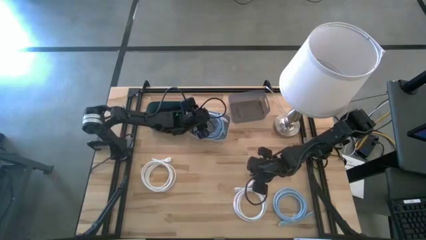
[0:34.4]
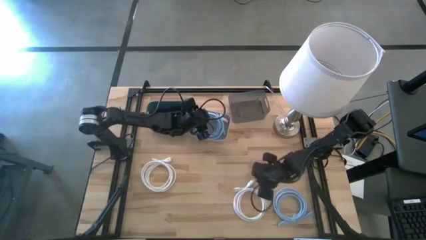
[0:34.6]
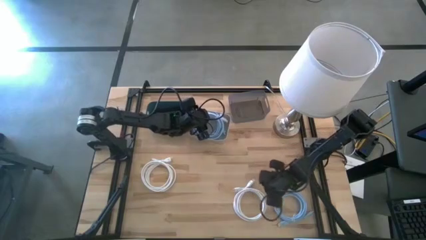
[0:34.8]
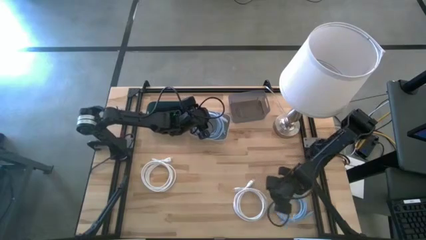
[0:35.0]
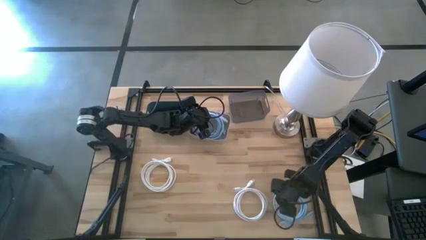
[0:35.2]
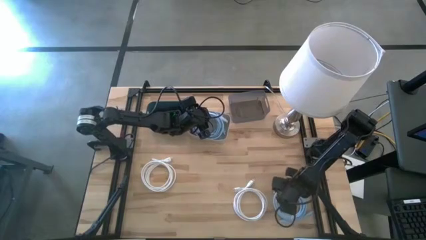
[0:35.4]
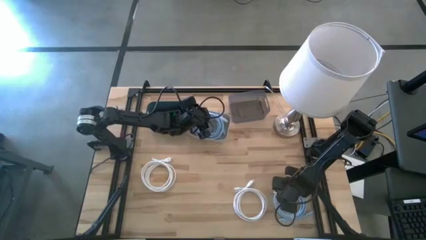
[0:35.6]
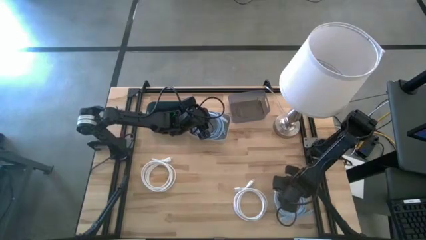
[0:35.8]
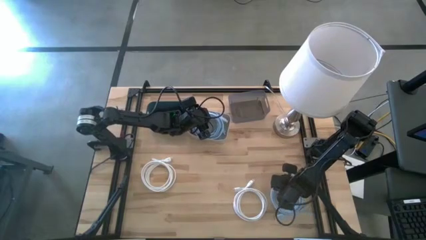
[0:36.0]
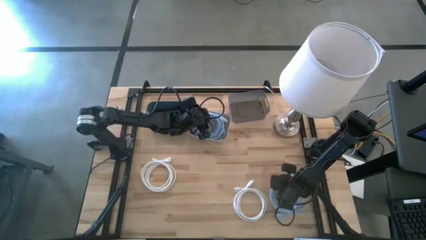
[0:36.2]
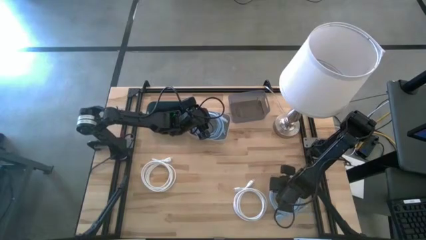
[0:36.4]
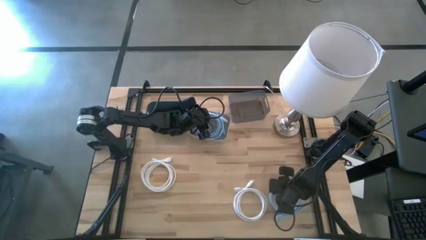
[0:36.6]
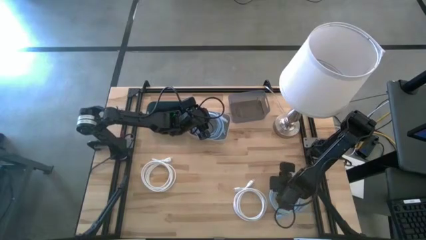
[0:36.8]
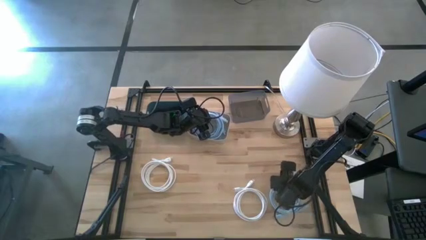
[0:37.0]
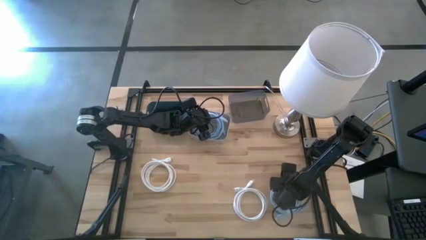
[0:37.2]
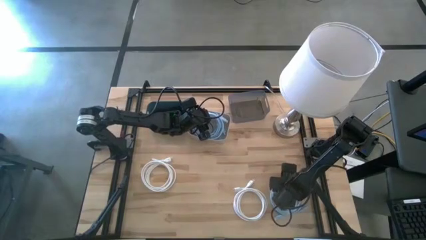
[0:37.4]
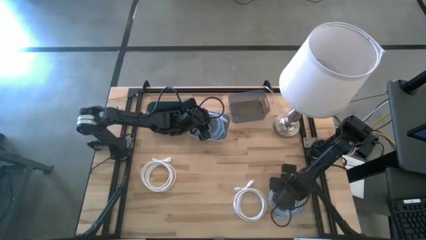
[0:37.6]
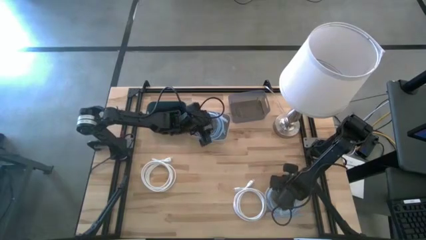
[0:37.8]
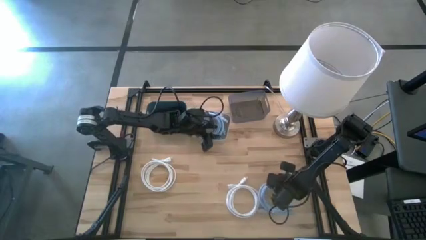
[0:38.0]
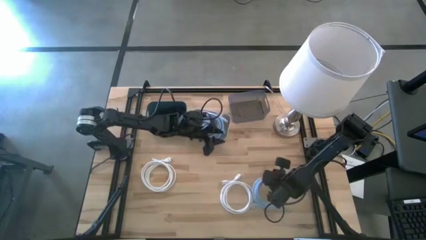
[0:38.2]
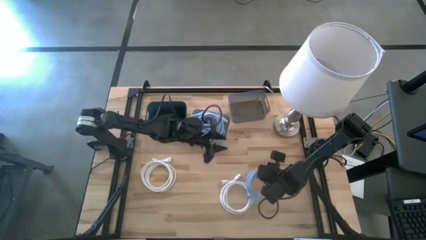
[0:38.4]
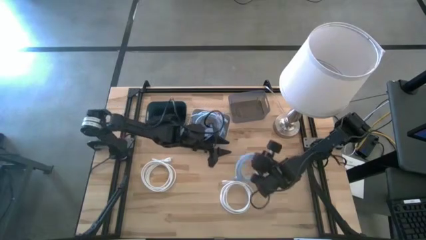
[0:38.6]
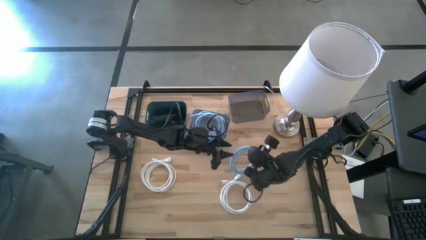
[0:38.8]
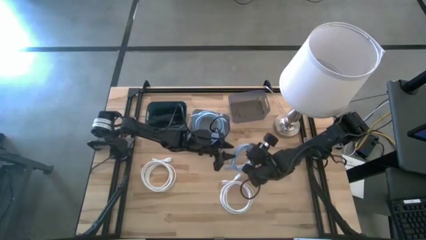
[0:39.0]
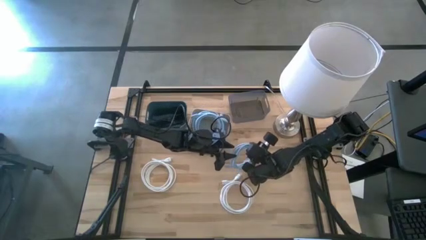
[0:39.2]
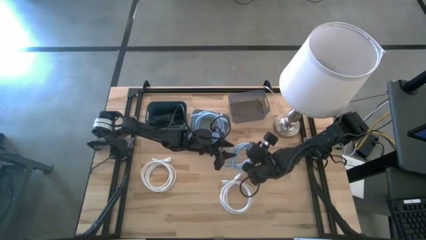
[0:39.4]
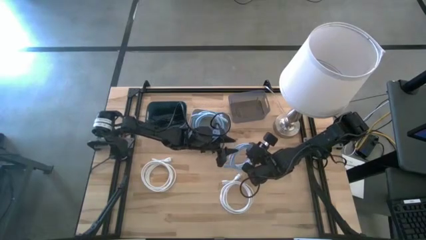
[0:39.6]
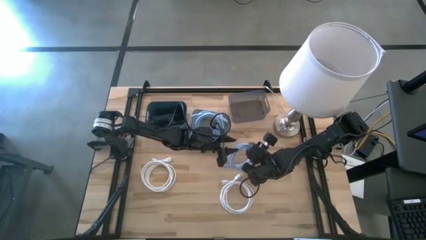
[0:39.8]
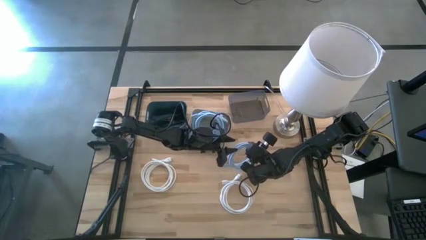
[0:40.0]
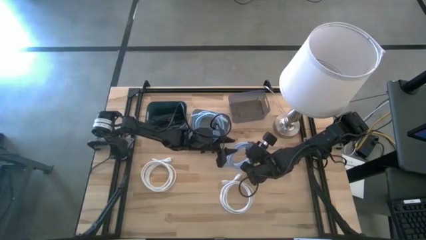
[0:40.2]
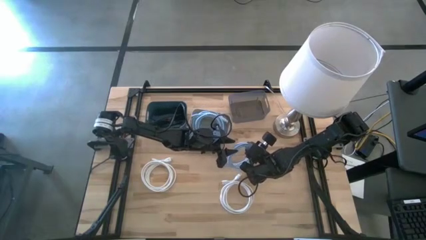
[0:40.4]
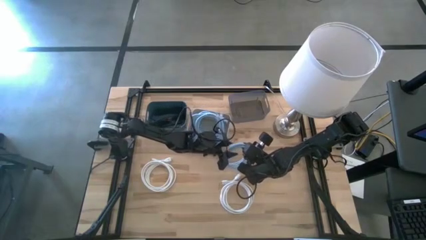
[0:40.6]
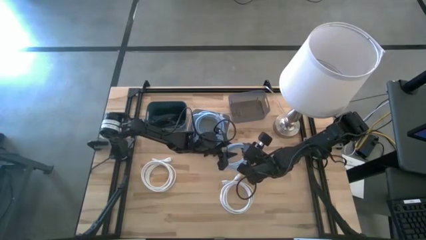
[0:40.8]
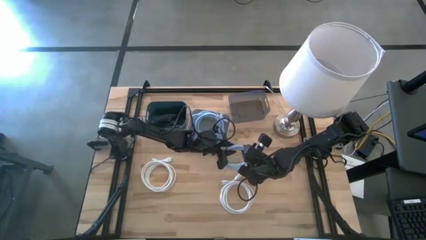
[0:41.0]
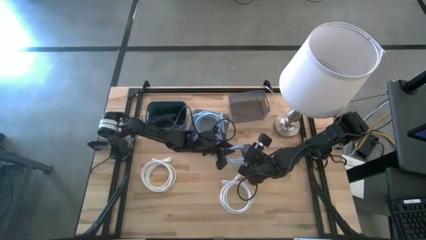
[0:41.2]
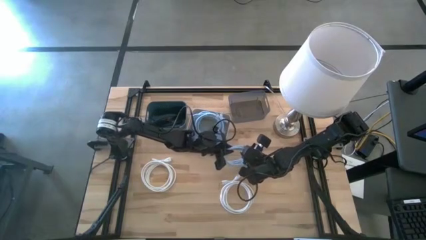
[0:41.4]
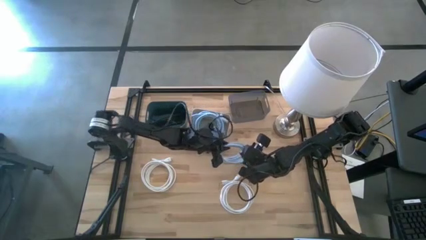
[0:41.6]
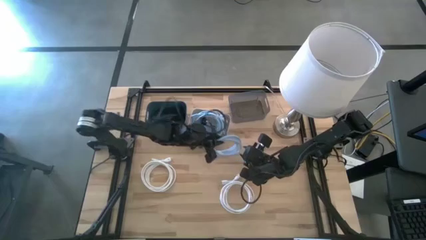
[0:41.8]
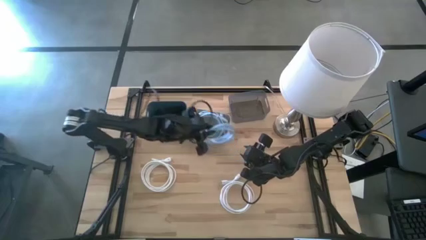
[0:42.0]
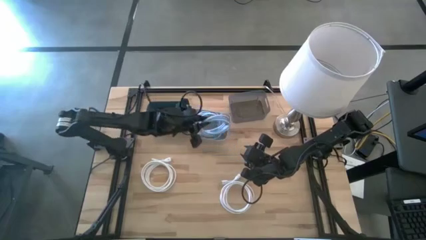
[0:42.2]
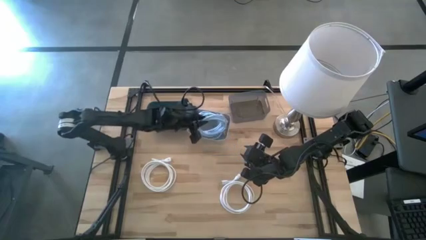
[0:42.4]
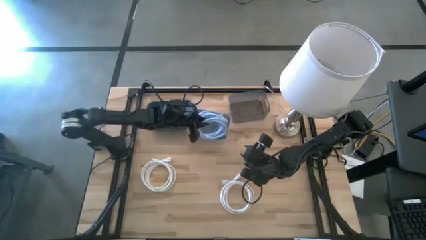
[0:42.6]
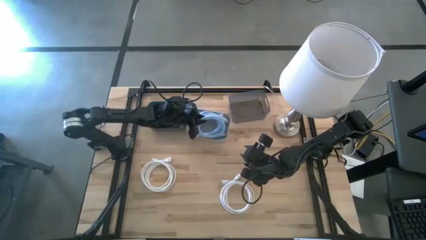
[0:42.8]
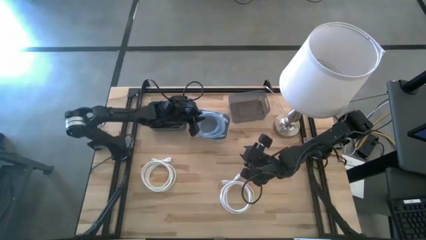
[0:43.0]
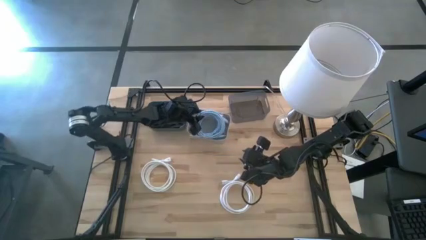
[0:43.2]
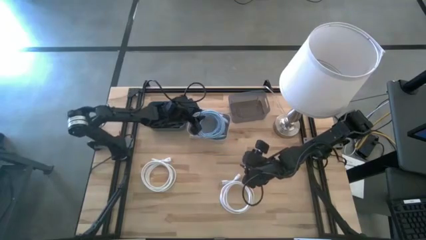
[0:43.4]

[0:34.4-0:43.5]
Task: Pick & Place USB Port
Put the blue charger cable into the white bin

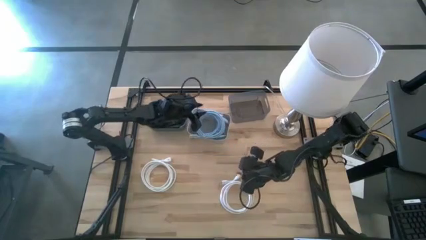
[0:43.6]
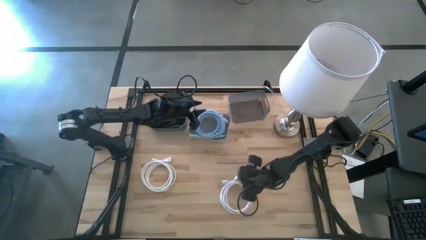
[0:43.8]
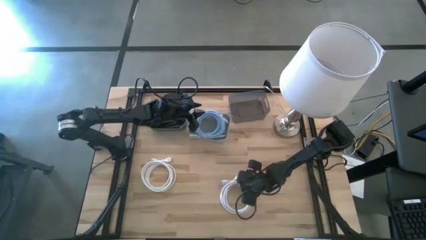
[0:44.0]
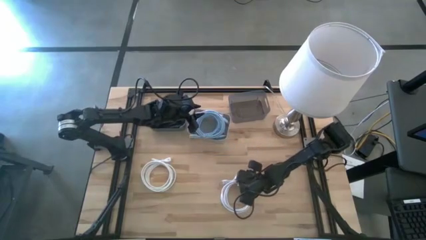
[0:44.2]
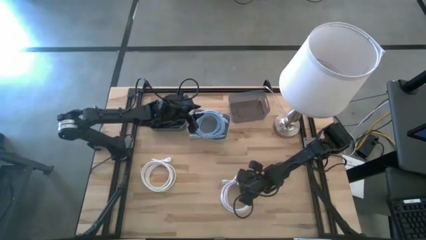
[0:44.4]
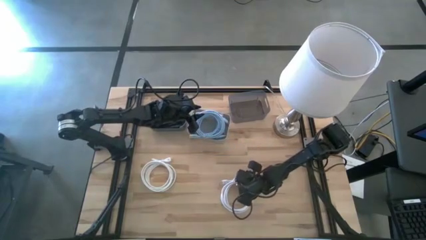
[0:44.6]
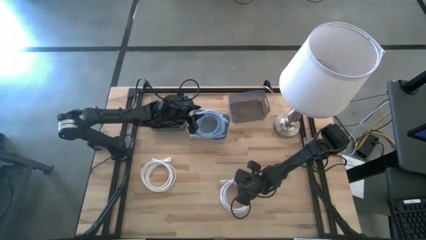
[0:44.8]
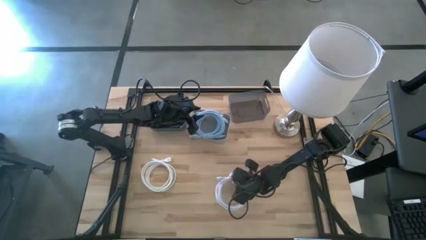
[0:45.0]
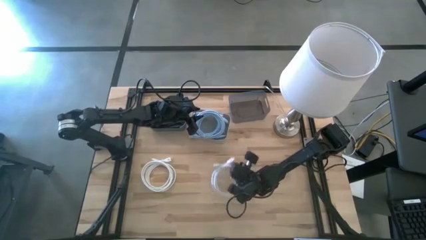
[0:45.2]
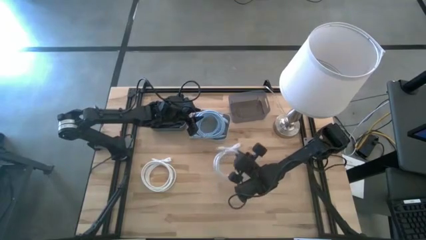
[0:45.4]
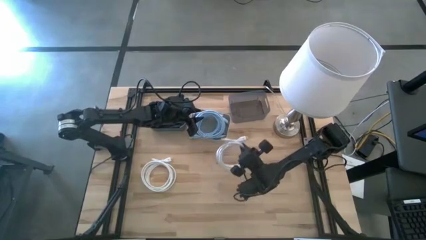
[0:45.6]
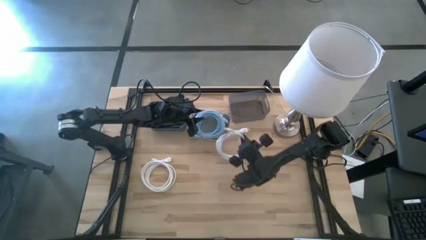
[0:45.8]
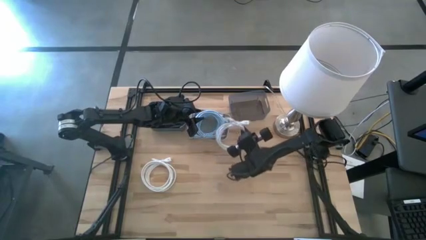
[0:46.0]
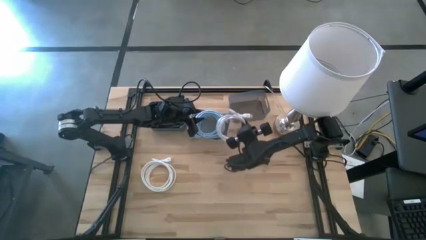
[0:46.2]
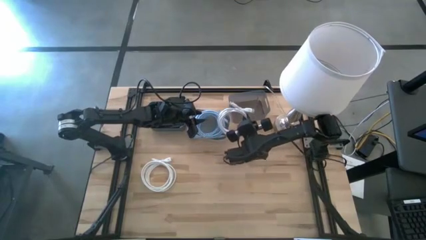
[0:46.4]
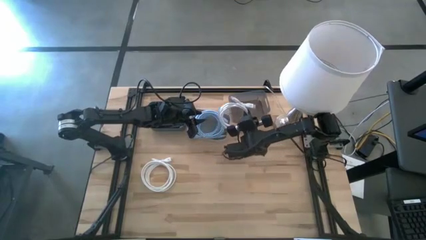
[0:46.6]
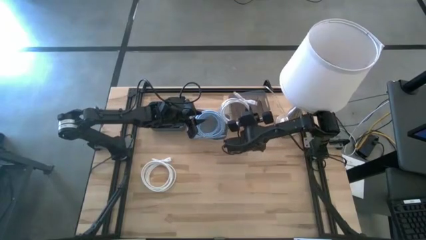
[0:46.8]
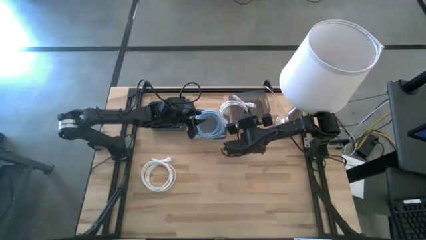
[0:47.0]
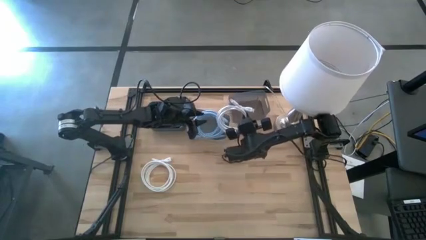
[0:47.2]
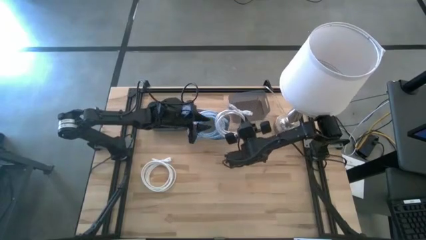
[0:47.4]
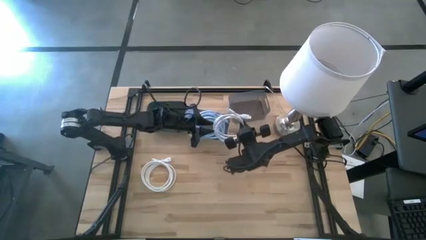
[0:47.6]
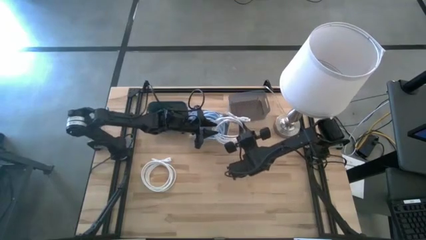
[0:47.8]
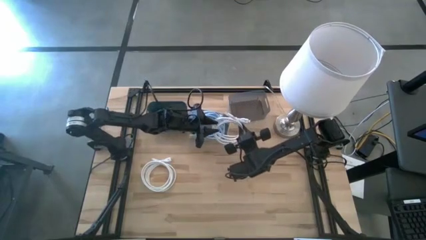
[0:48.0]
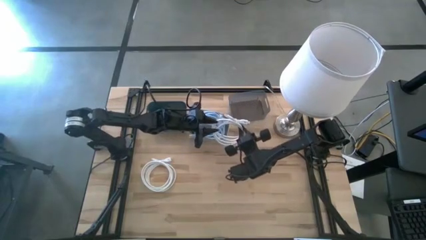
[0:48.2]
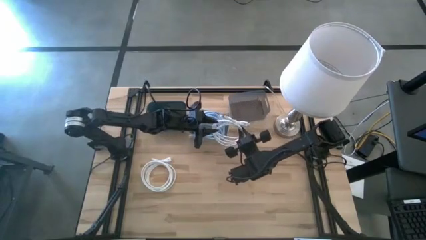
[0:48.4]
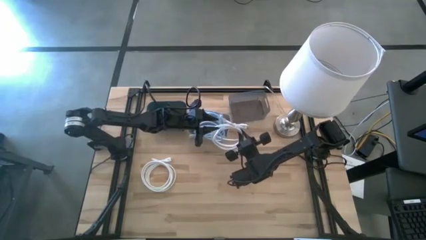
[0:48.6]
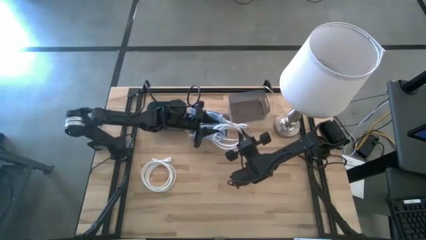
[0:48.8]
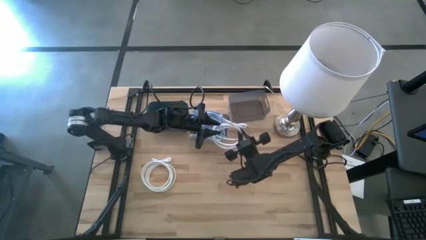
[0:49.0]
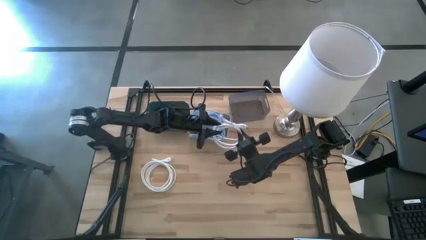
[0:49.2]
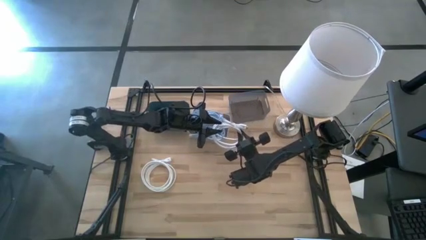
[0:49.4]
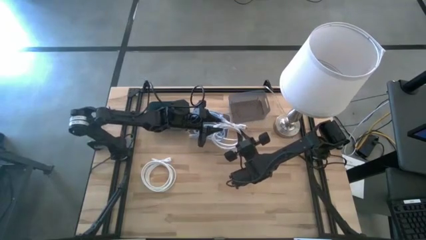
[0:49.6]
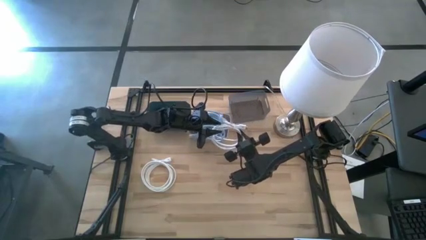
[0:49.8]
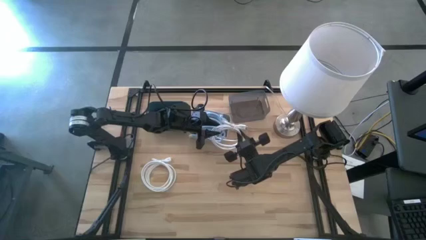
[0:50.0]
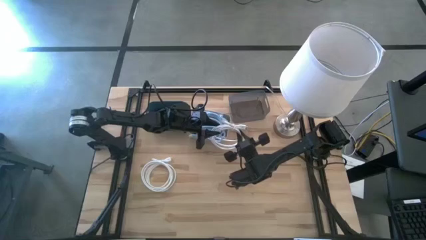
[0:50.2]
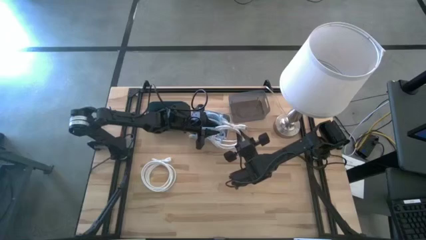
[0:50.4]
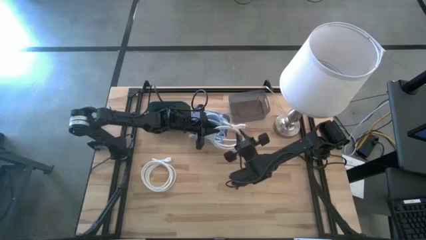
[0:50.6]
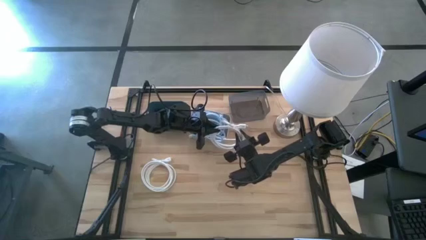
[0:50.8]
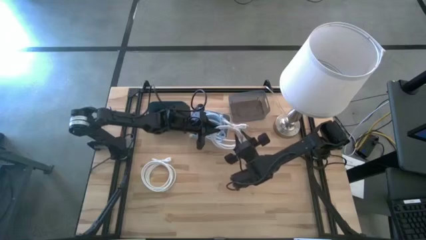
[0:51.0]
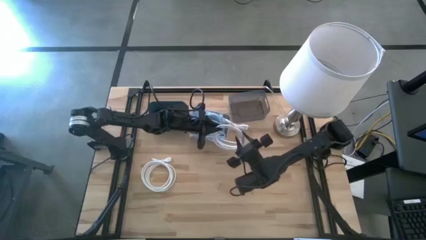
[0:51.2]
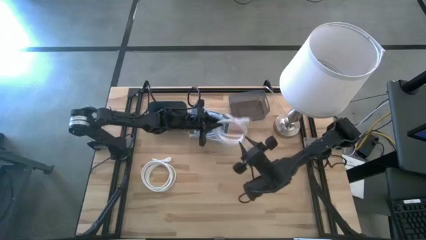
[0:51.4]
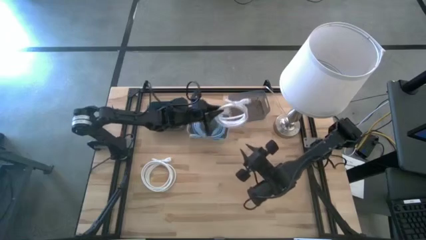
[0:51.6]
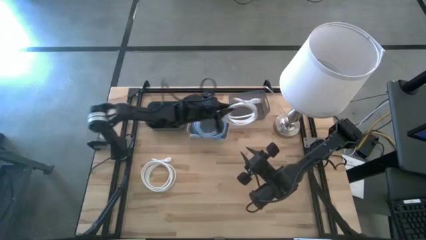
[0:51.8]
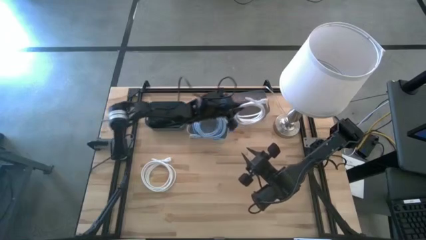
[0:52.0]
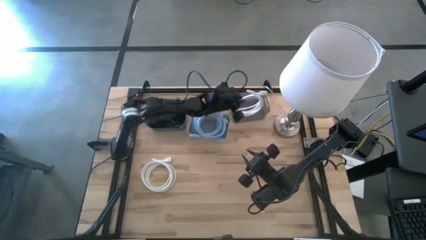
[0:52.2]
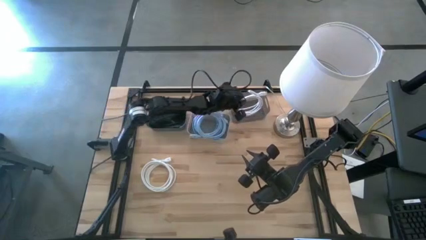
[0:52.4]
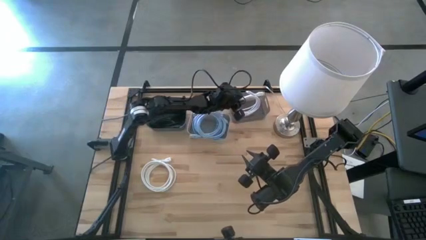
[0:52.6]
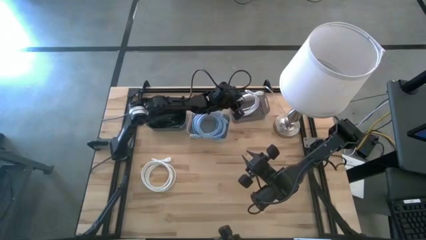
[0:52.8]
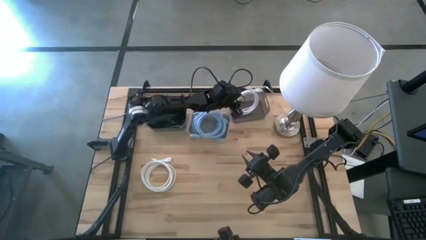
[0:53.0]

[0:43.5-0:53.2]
Put the right white charger cable into the black bin
